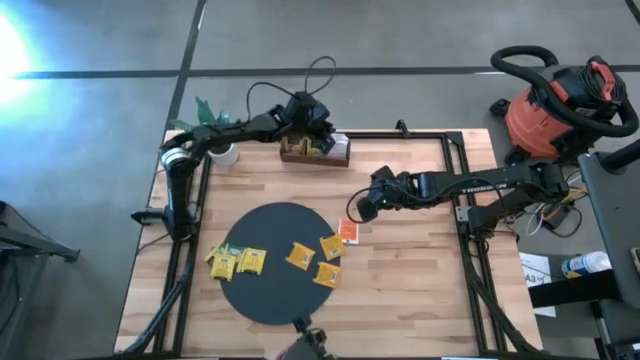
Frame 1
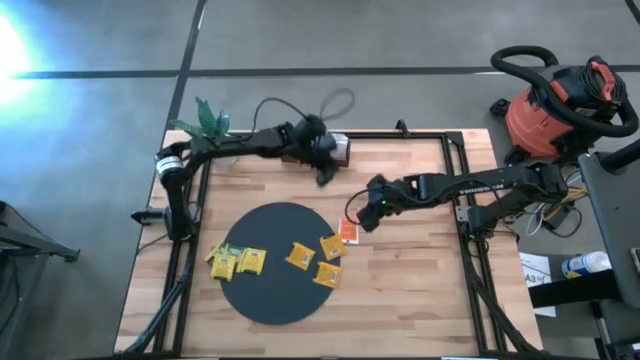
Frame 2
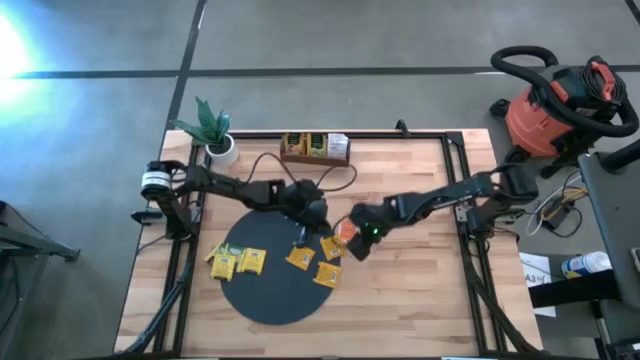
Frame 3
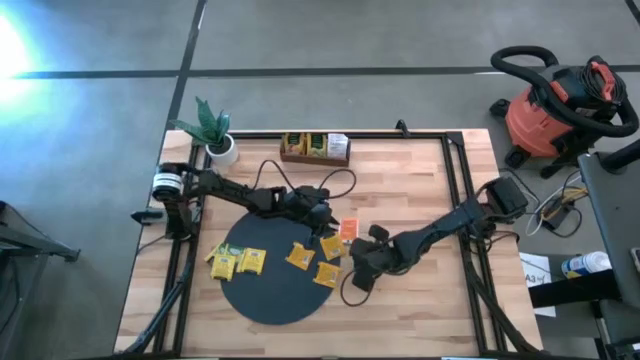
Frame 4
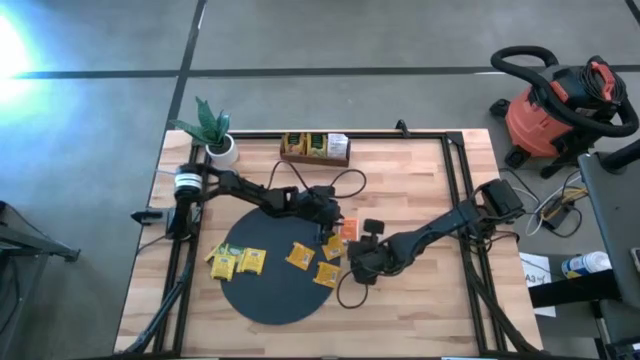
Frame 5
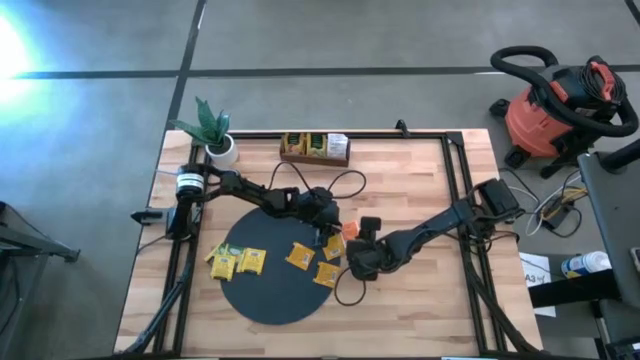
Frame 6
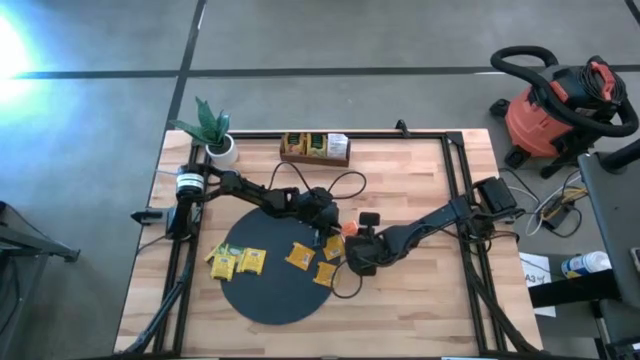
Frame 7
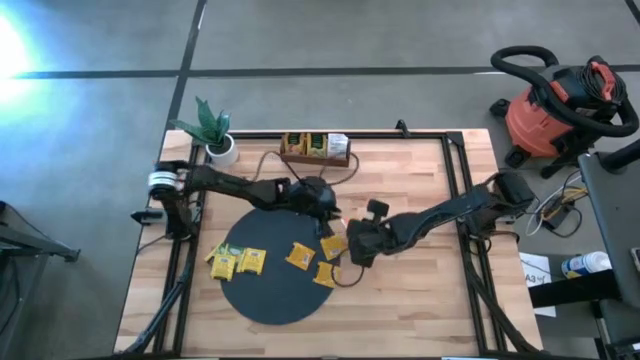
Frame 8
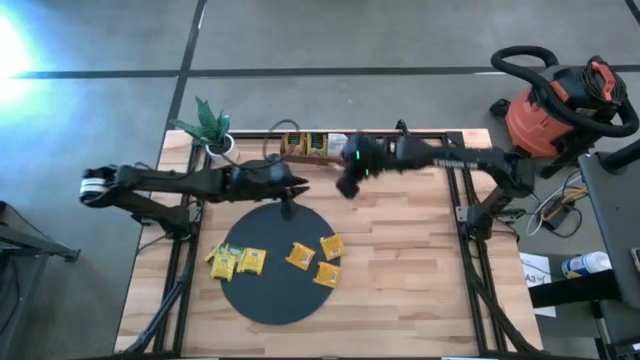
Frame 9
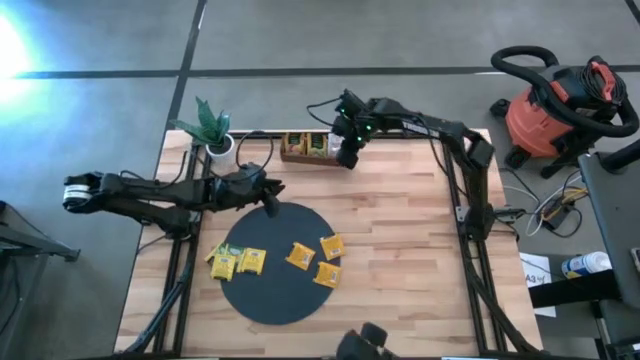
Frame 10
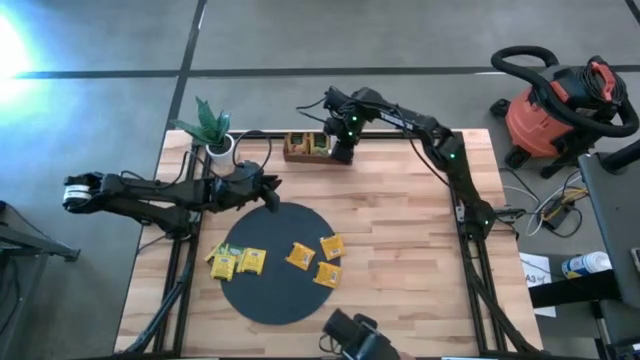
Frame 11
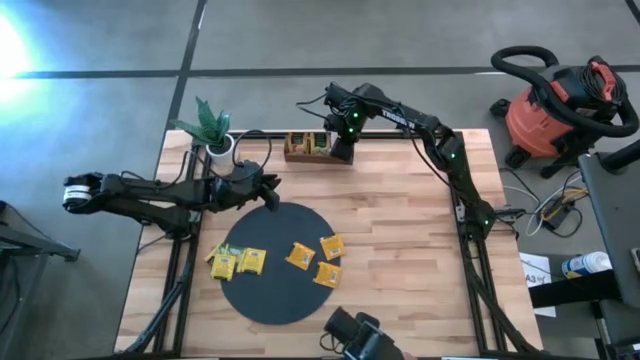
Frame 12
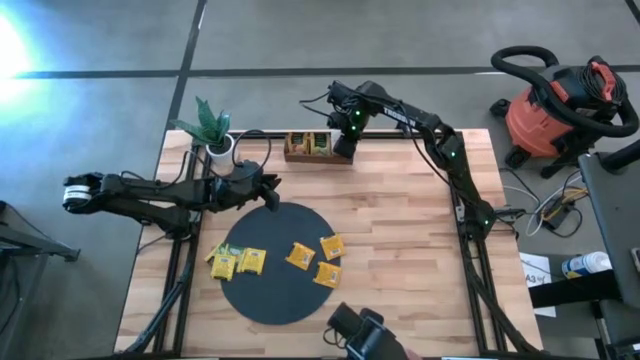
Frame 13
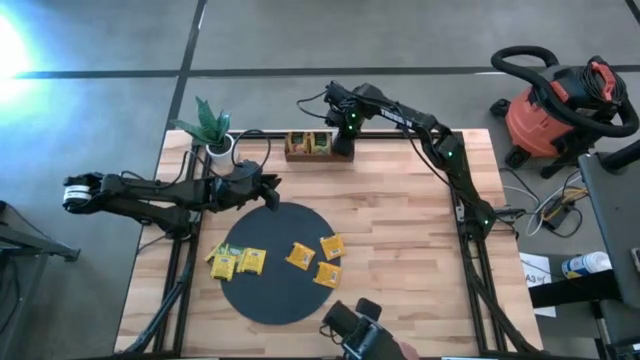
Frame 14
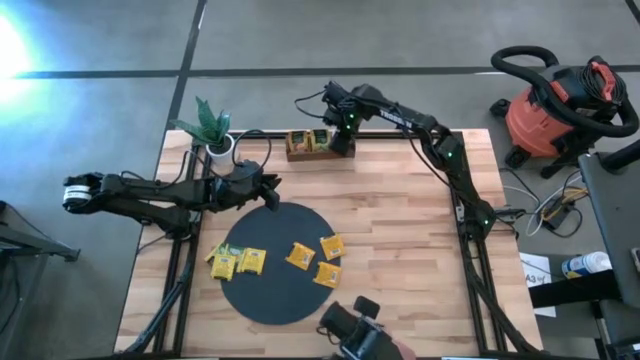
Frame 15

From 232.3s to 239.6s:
Task: Pick & Place Tea
Put the white tea bag into the right section of the wooden organizer

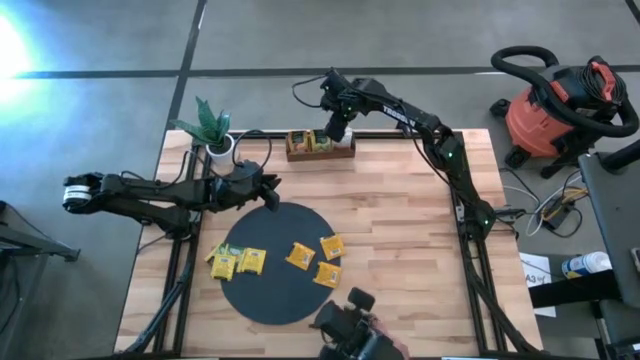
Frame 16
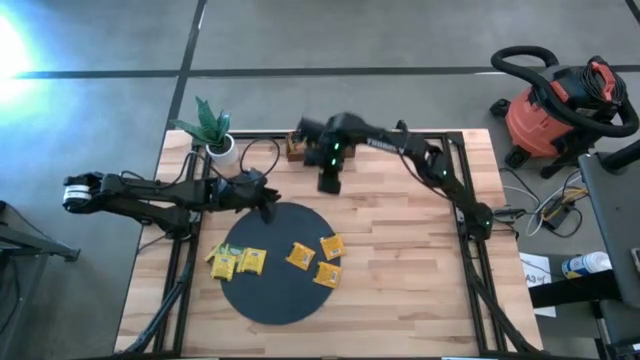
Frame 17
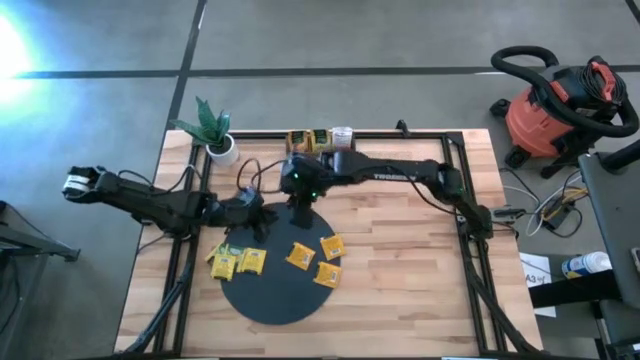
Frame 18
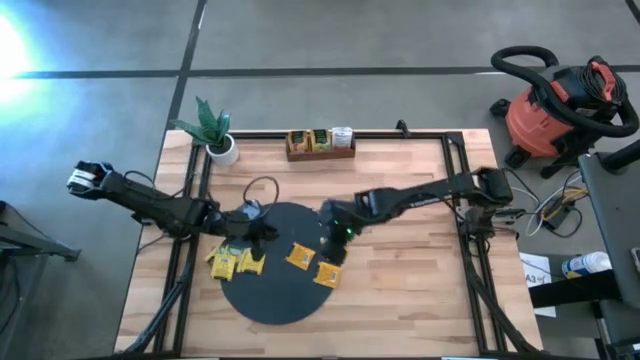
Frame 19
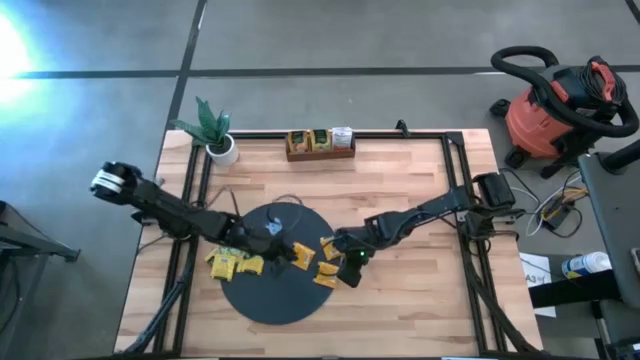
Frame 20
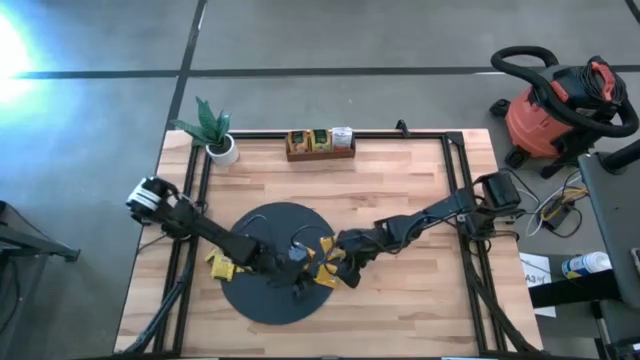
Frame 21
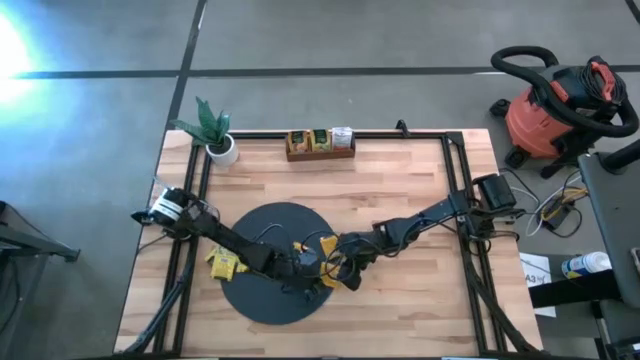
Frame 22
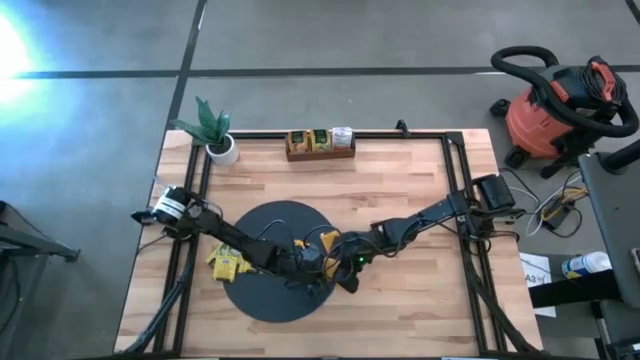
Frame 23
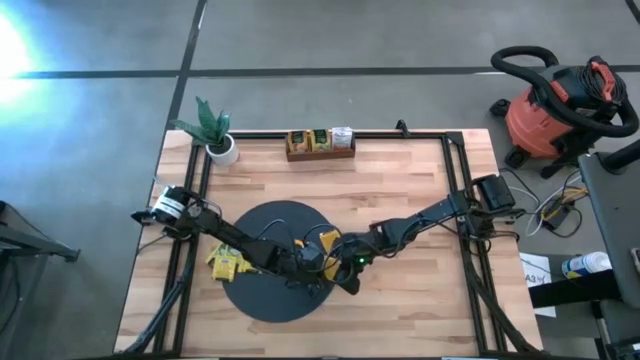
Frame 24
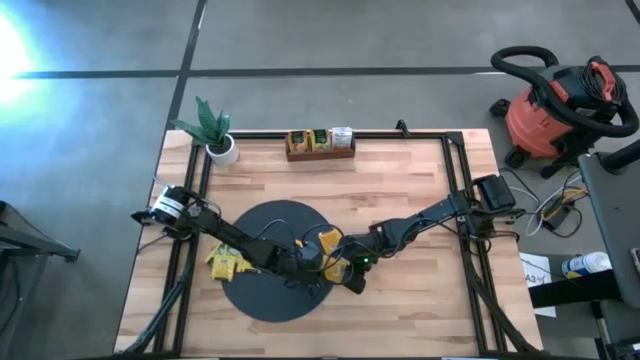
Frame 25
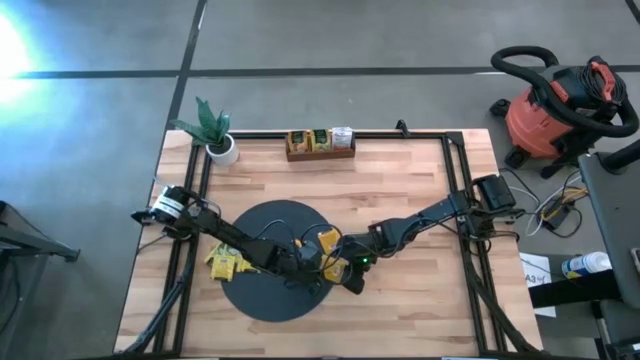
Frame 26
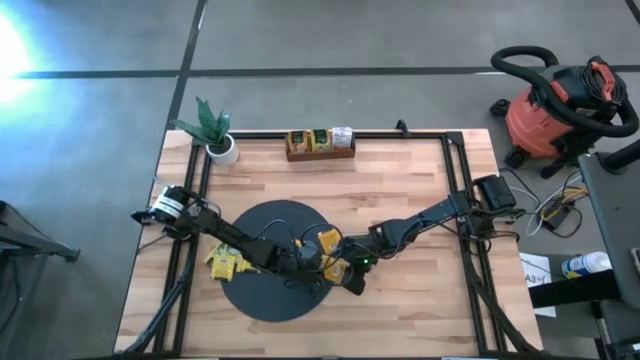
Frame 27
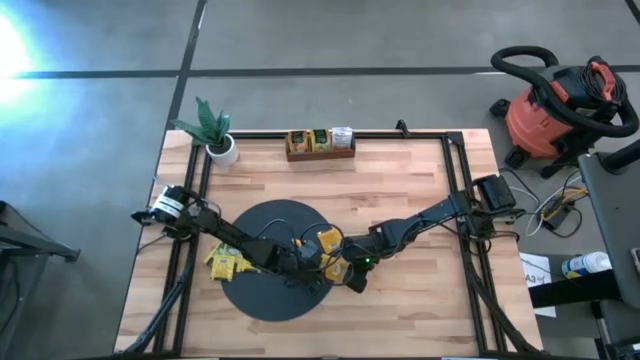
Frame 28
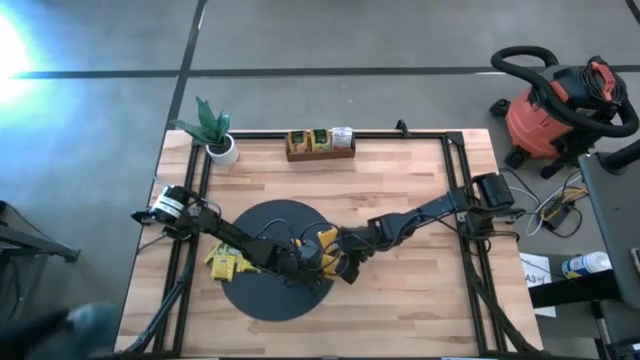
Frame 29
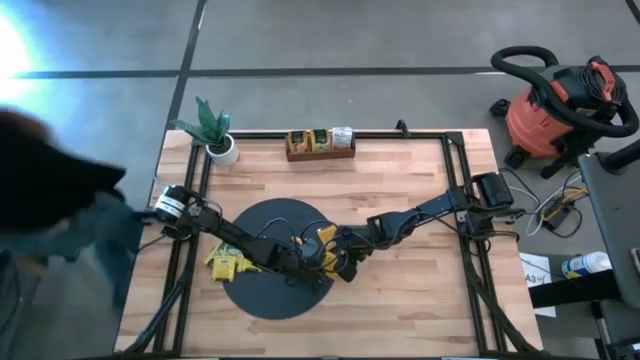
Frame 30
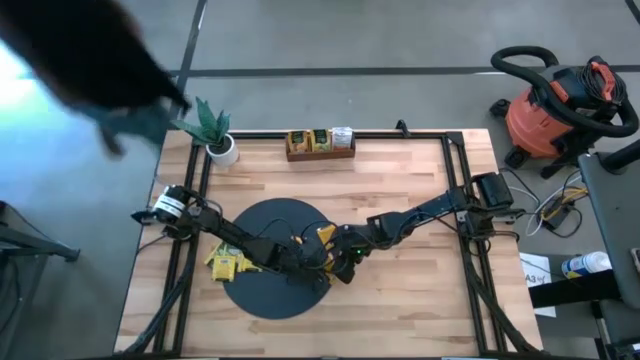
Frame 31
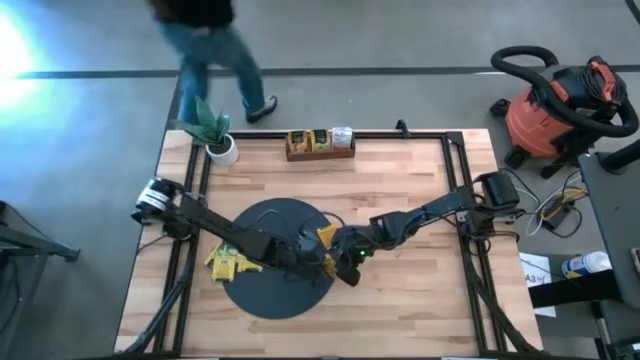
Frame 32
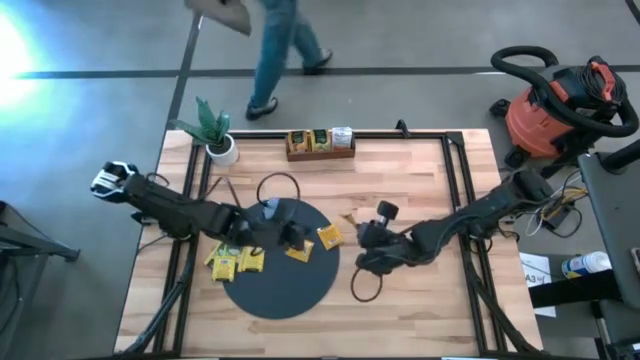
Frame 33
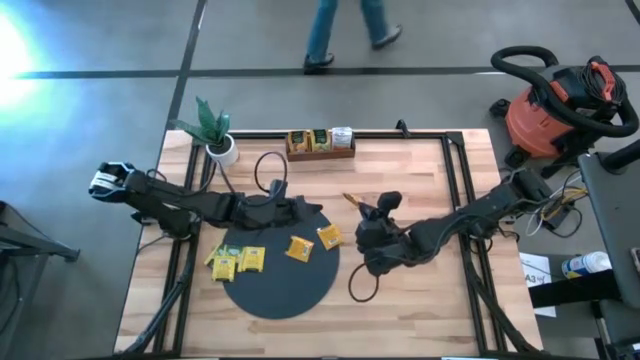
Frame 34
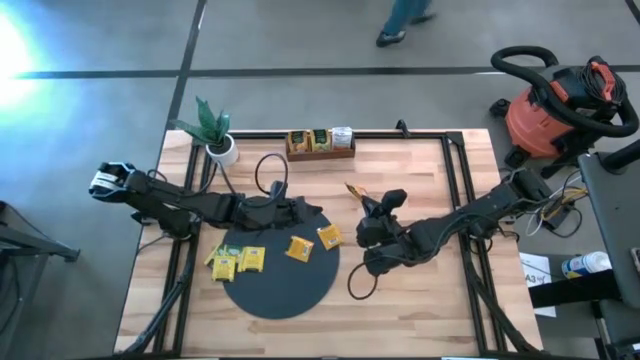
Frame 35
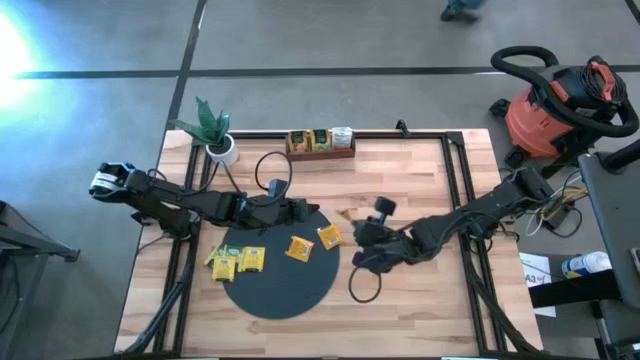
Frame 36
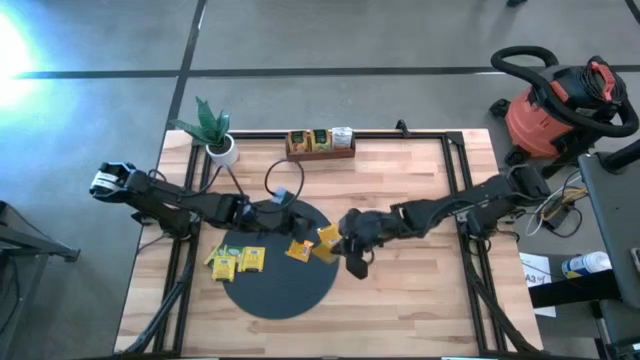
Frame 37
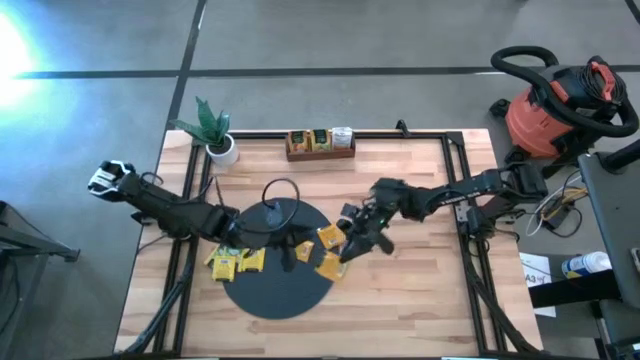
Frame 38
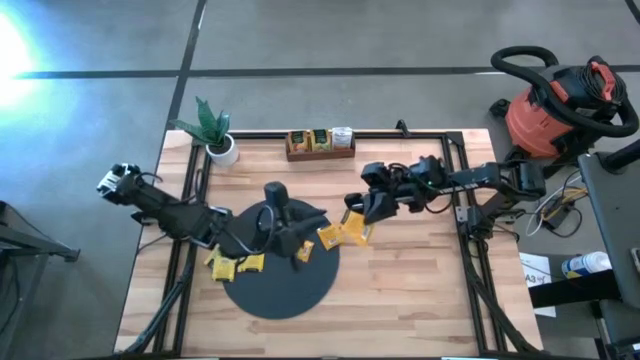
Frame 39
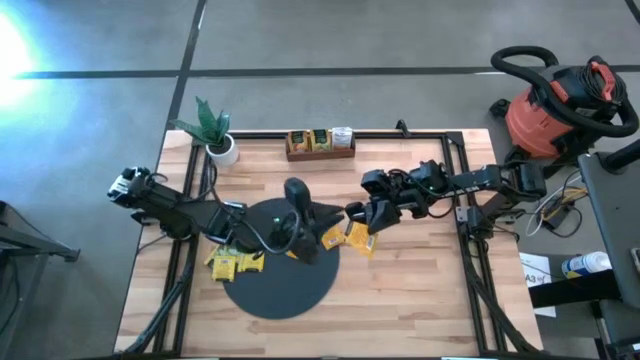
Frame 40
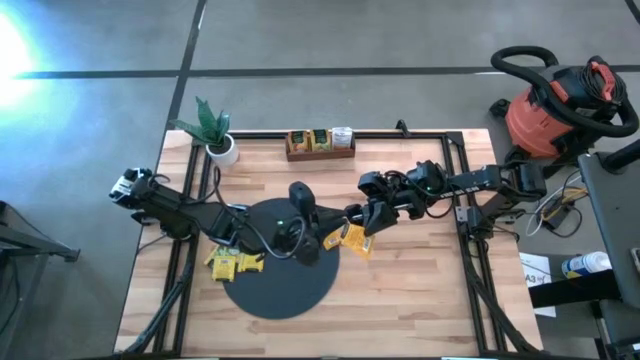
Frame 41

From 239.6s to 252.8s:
Put the orange tea bag into the left section of the wooden organizer

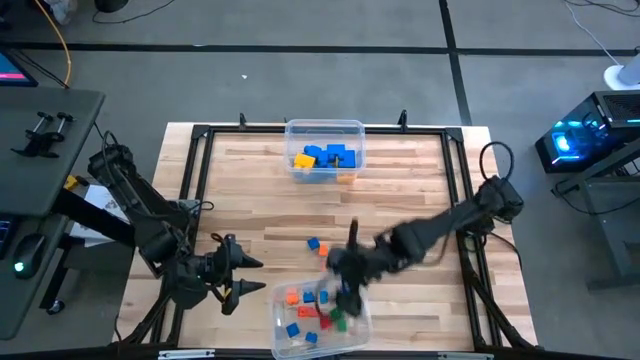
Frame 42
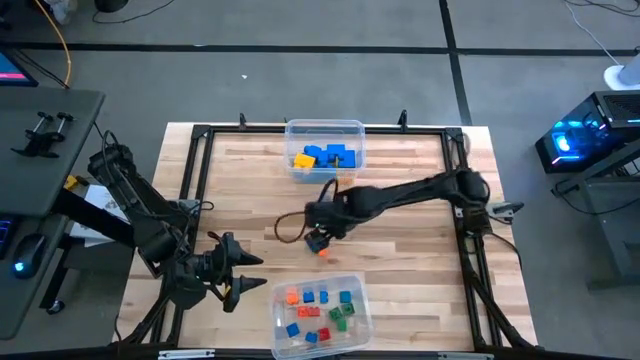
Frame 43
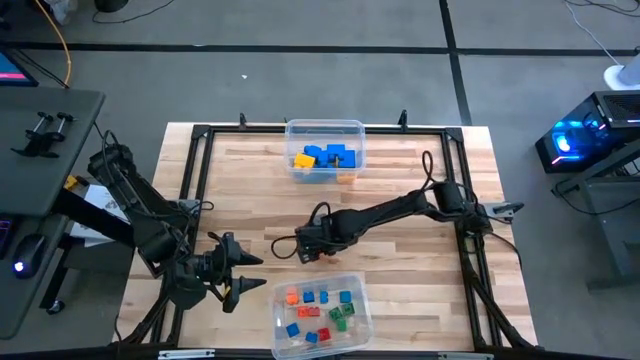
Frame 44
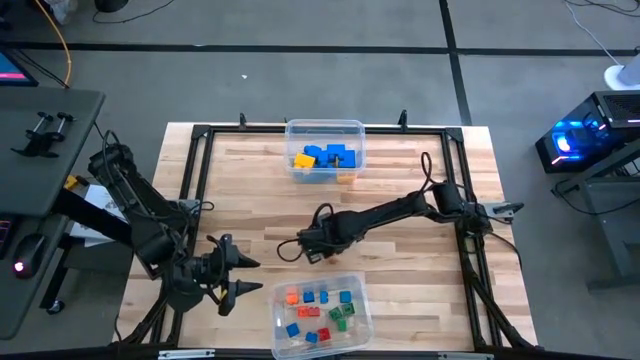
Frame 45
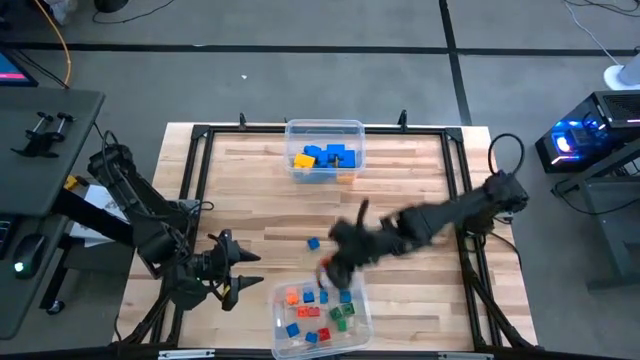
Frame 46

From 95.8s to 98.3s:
Task: Sort blocks by size
Put the small orange game piece into the bottom transparent bin
